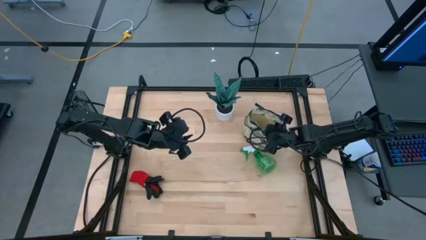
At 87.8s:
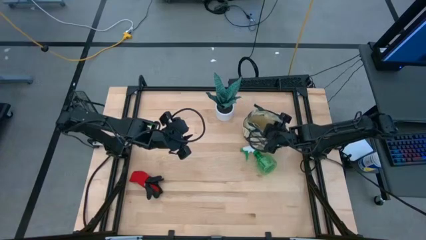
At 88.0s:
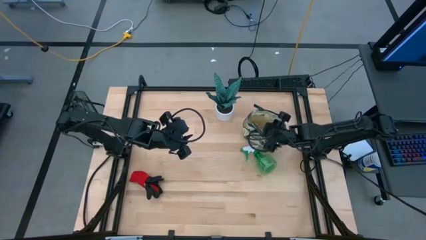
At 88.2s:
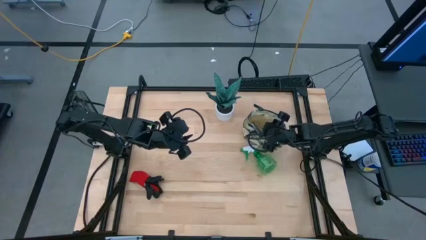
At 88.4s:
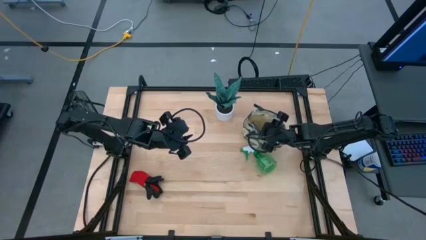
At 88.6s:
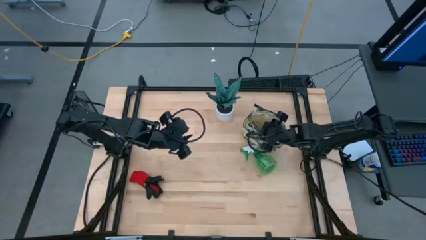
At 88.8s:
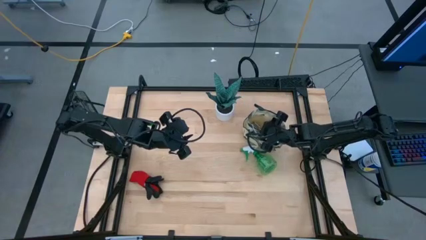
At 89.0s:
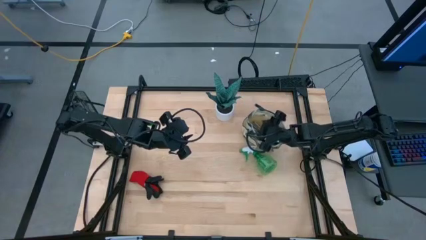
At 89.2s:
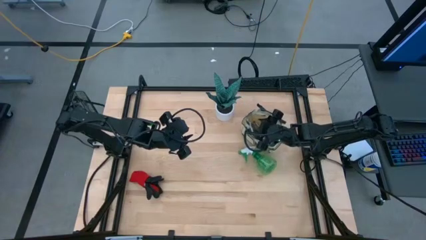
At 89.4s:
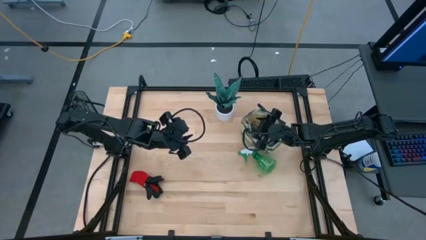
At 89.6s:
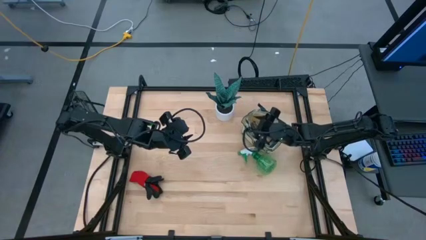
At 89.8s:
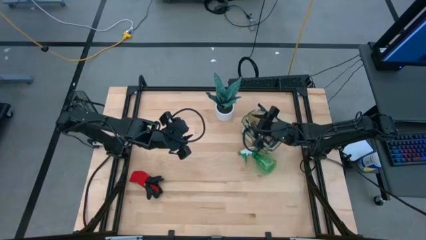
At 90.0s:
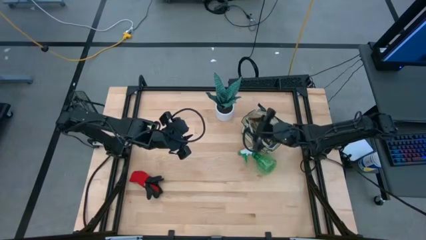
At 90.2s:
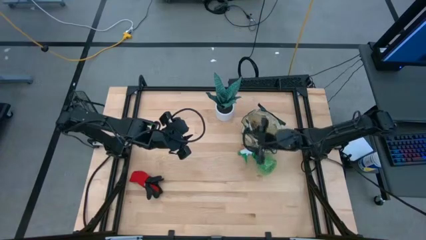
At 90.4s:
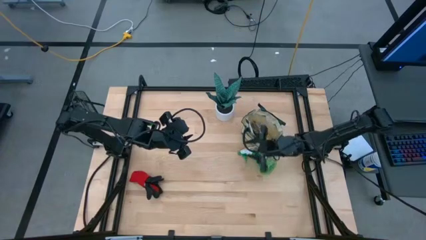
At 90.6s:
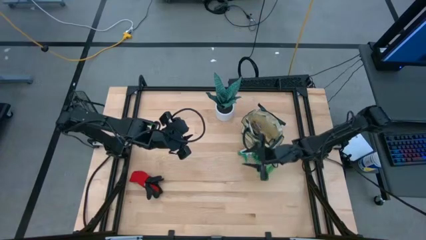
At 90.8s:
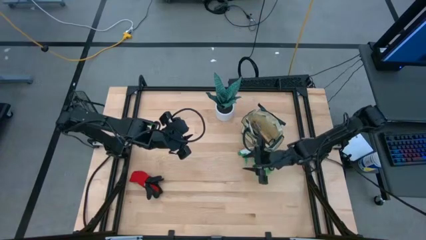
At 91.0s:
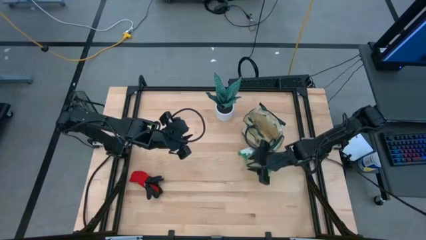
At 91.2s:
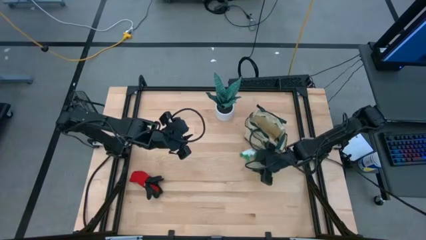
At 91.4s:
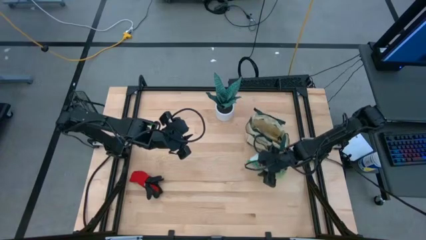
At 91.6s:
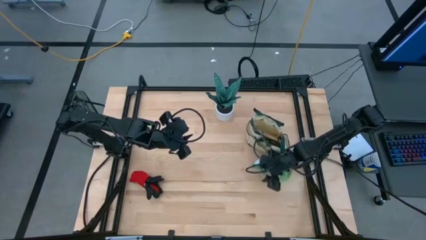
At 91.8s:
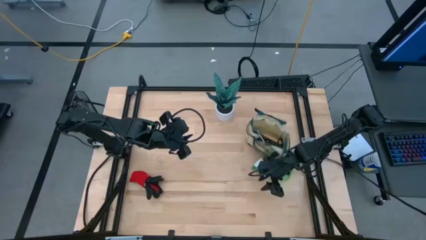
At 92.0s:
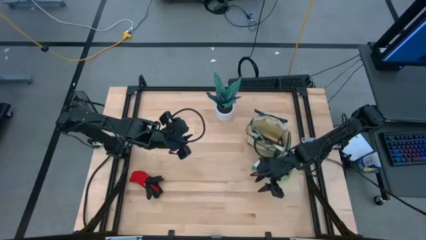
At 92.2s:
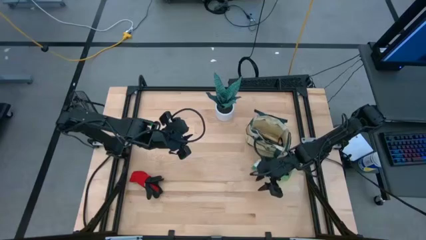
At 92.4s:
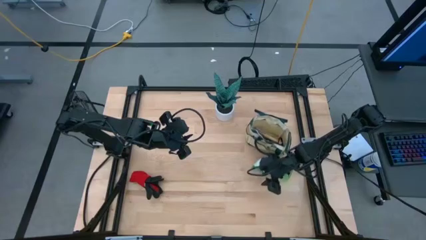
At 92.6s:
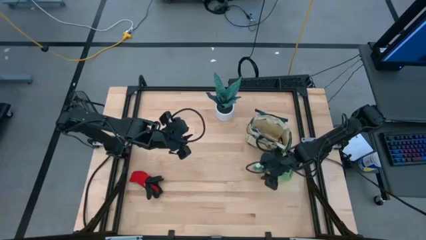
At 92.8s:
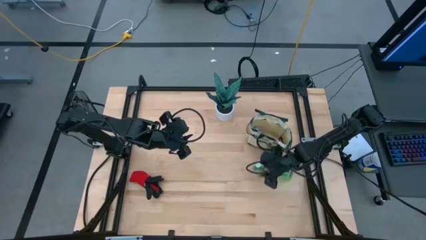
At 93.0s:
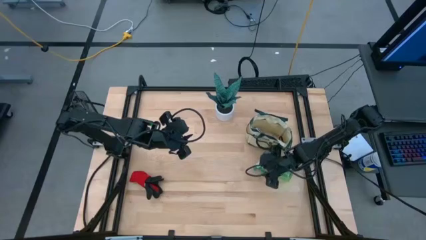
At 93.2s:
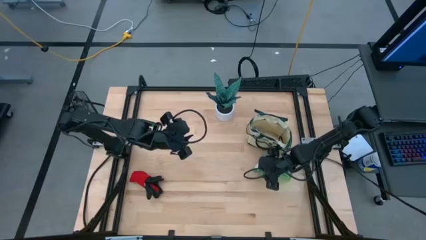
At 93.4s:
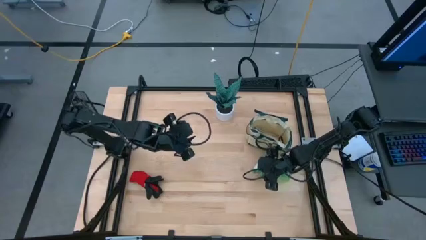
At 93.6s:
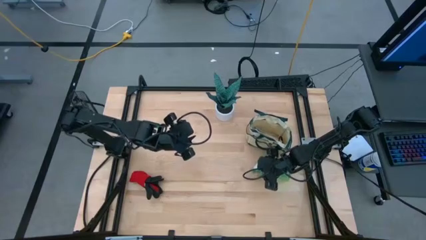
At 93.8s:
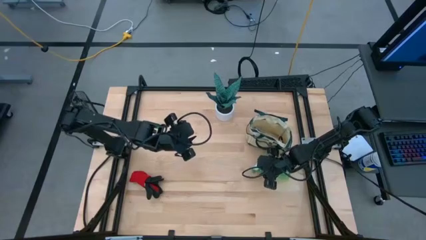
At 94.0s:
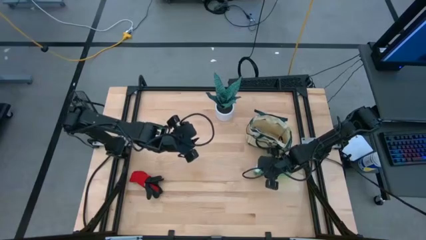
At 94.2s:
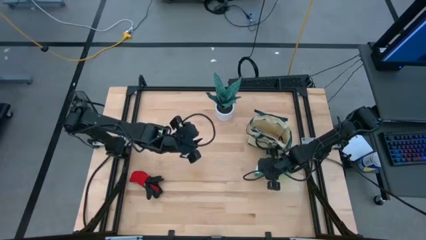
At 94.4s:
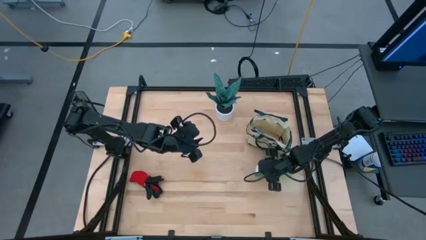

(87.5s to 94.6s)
Task: Pick & Place Garden tools in Gardening bag
Put the green spray bottle into the gardening bag

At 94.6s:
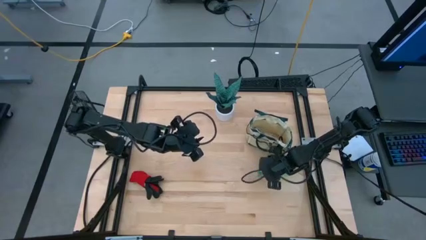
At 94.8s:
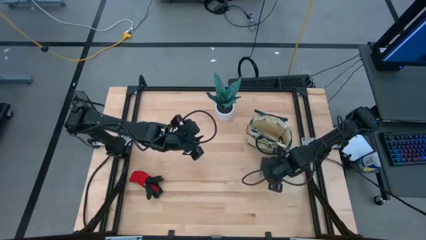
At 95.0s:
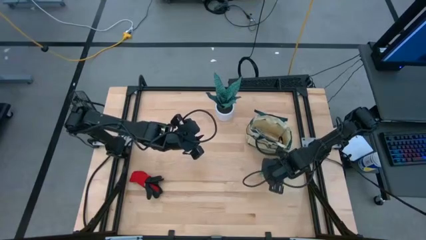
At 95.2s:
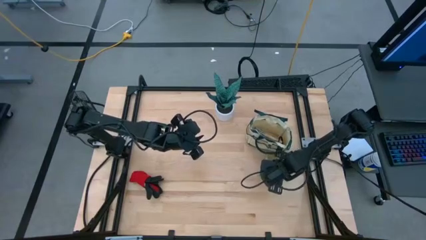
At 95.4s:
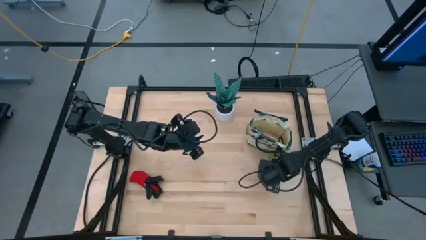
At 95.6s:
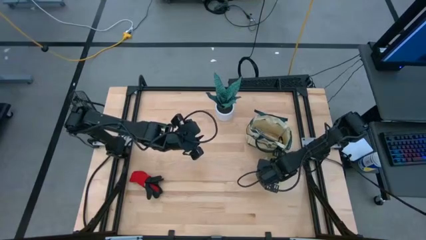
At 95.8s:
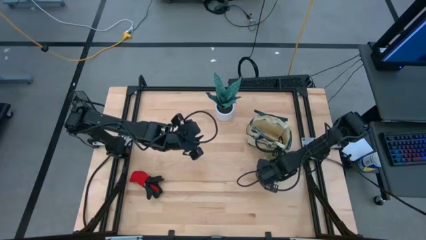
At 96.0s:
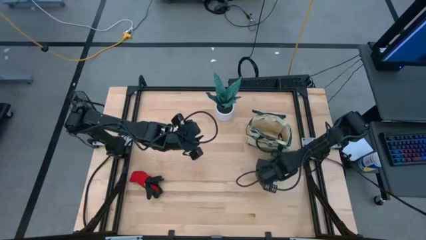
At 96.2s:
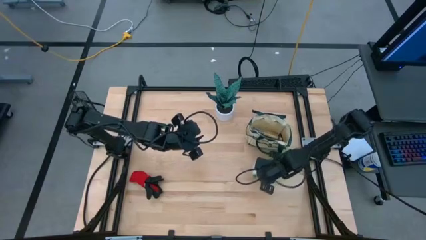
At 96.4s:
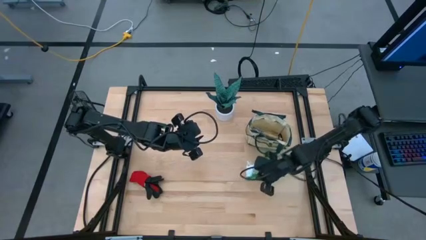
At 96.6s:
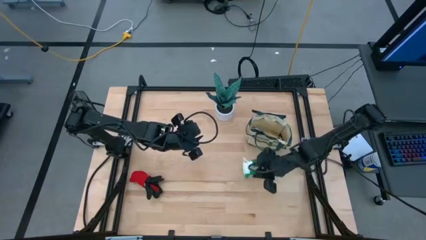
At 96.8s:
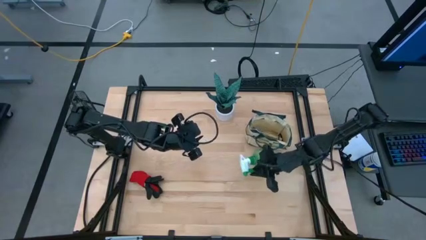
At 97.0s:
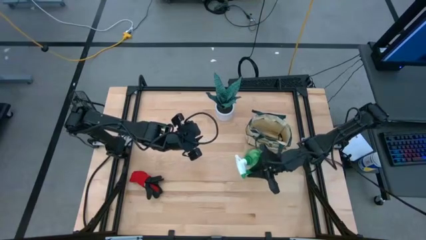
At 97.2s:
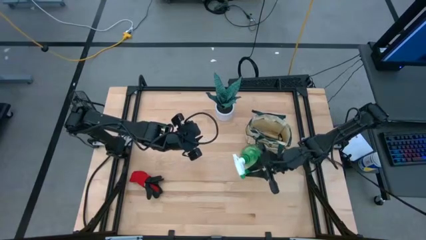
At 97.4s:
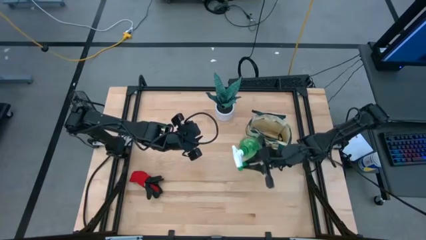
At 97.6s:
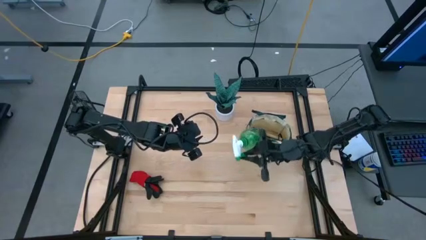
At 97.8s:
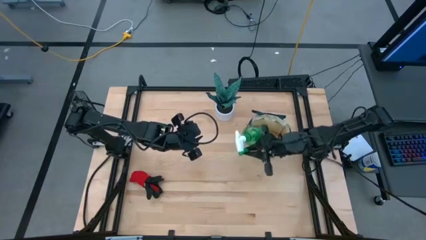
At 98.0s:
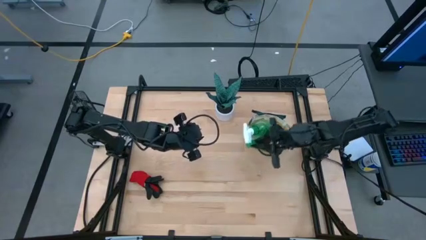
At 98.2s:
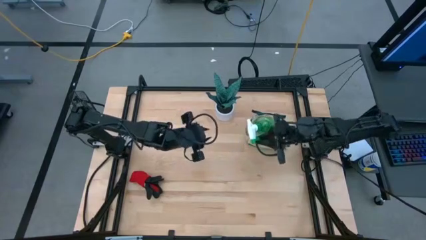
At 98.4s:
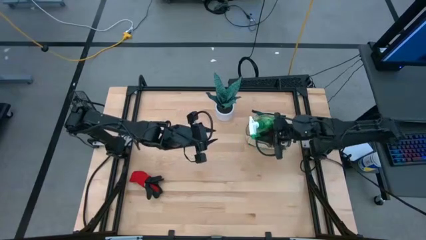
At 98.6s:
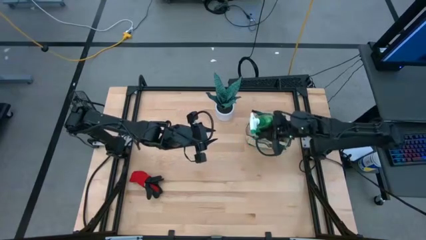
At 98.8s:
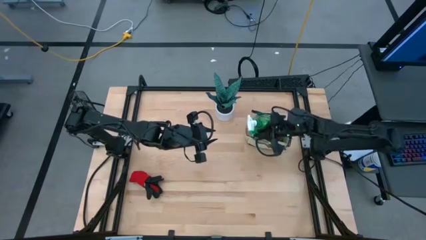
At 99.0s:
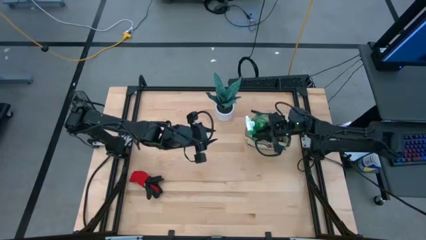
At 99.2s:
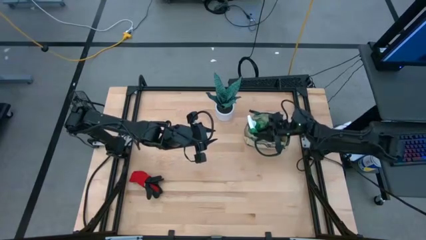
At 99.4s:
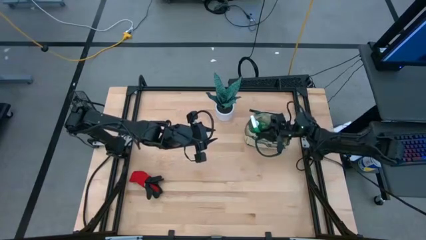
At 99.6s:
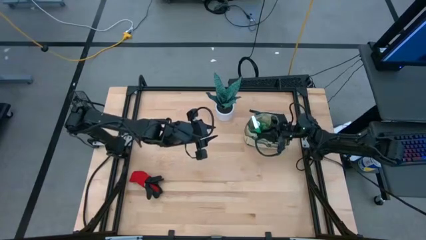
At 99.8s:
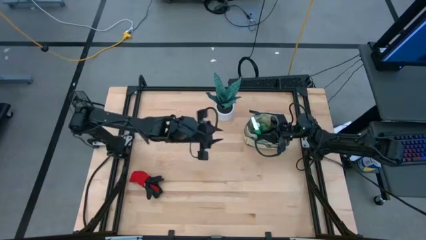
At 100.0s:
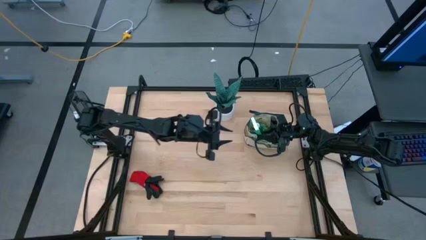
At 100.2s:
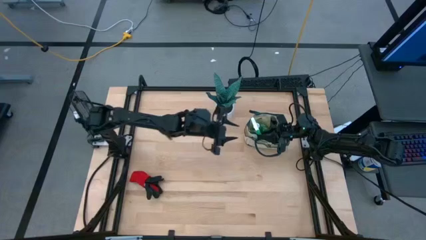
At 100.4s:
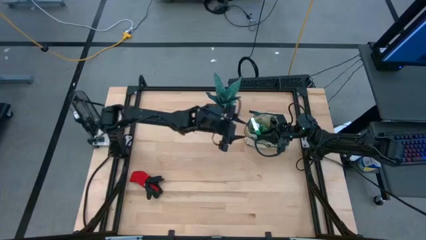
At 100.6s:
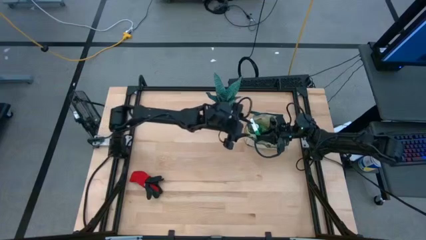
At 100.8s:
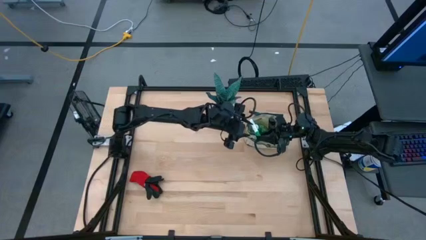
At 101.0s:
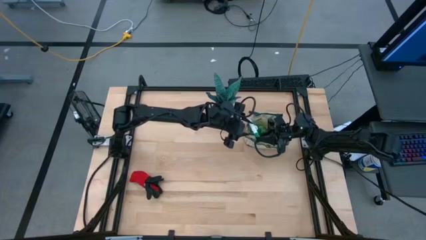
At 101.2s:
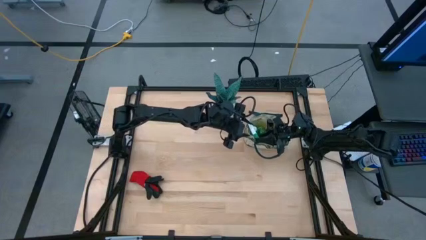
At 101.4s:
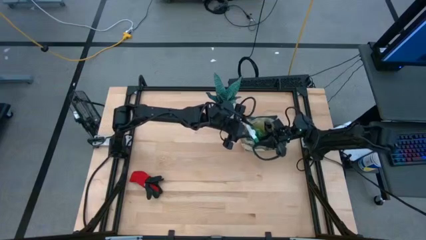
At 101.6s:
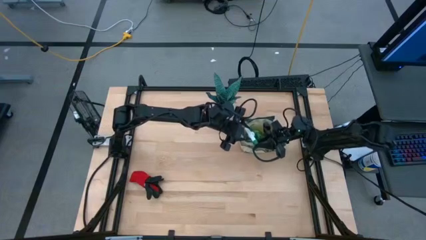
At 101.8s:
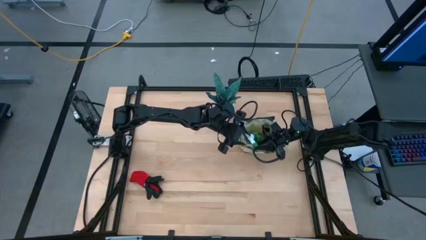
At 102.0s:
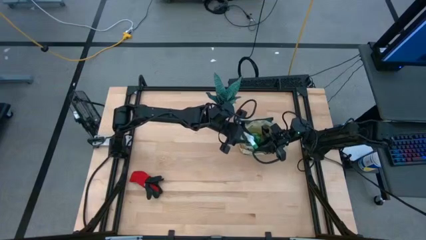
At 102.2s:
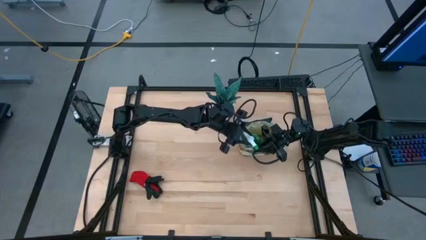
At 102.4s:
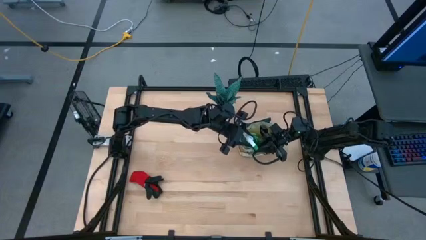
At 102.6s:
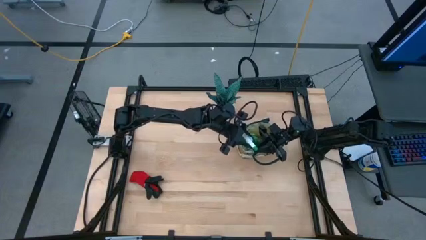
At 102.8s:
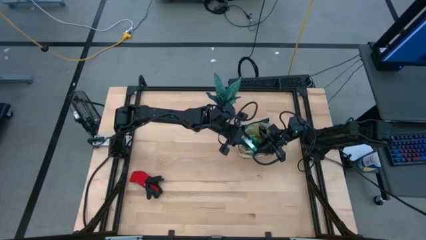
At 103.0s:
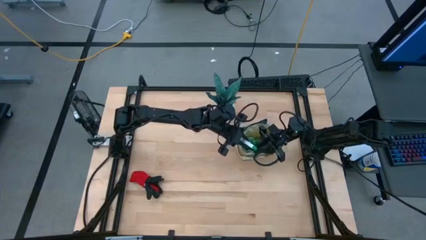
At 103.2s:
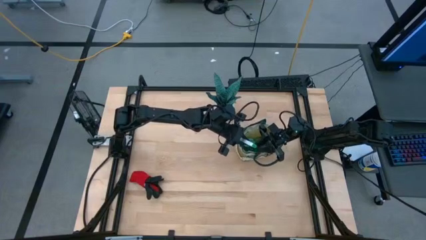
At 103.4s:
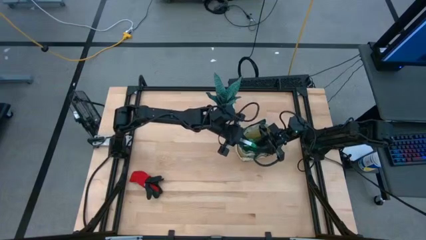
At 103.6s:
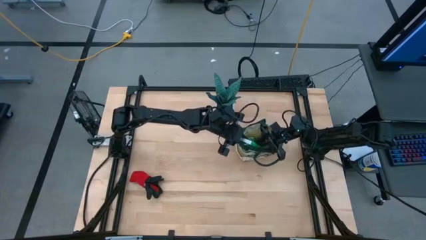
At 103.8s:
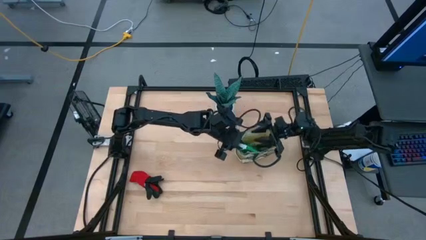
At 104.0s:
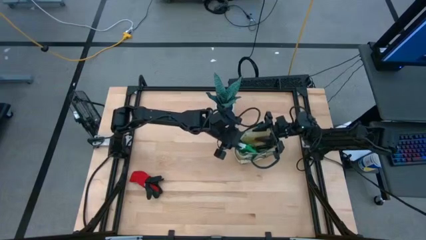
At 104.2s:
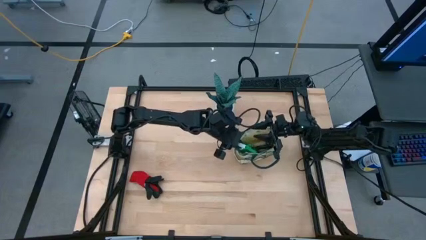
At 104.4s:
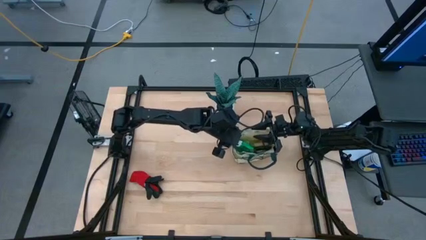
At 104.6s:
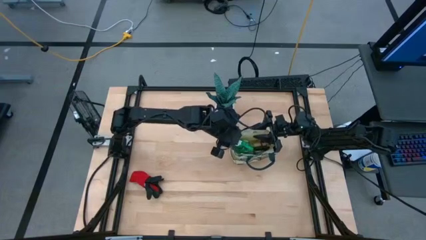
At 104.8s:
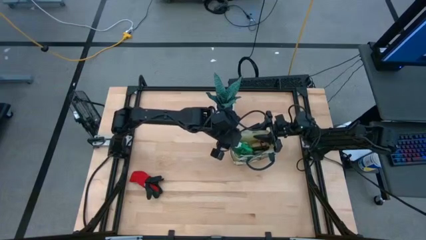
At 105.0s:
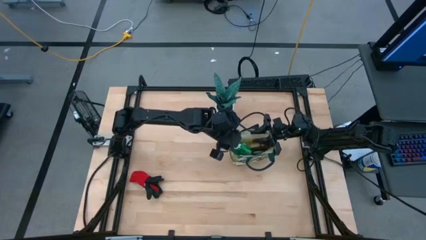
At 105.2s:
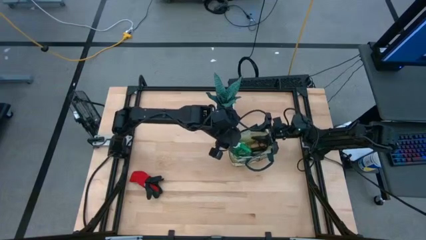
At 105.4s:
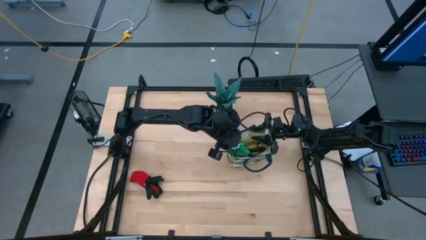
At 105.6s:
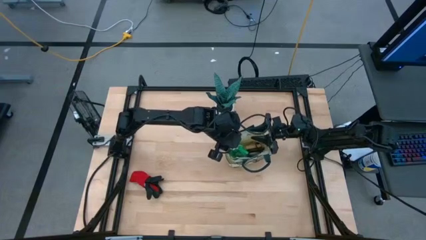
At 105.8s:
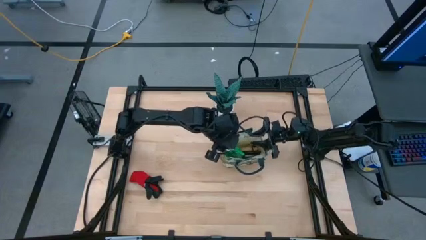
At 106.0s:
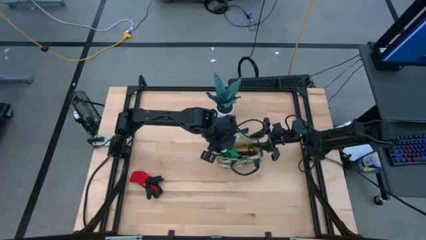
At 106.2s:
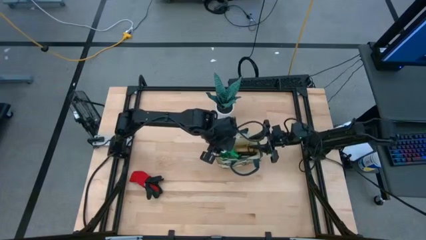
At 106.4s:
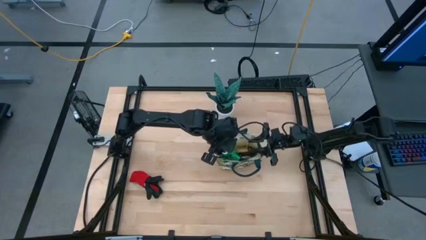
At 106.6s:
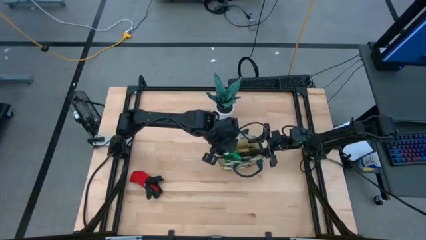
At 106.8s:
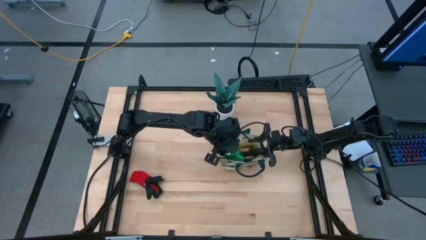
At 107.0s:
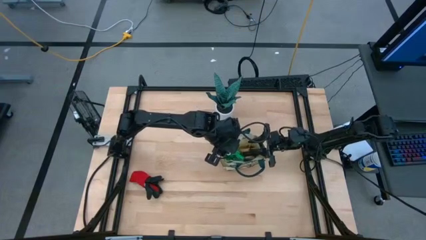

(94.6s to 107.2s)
Put the green spray bottle into the gardening bag
